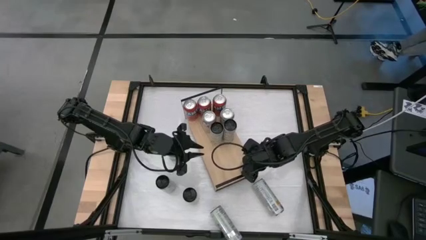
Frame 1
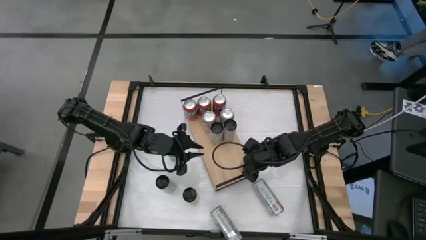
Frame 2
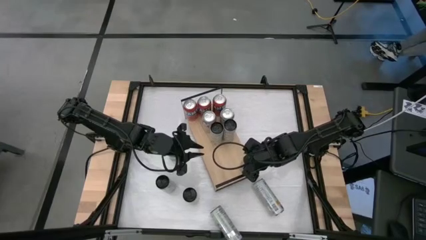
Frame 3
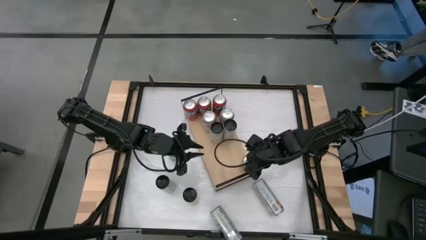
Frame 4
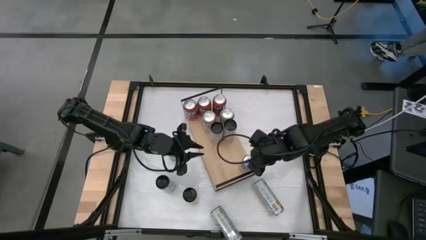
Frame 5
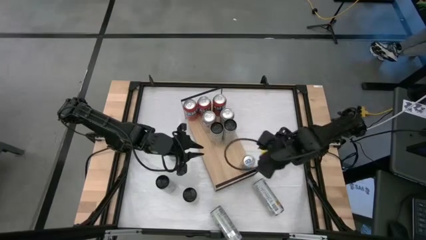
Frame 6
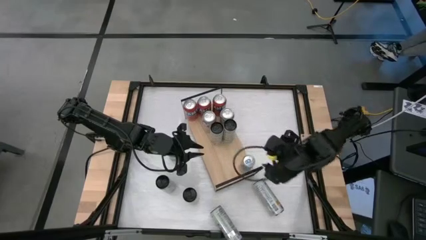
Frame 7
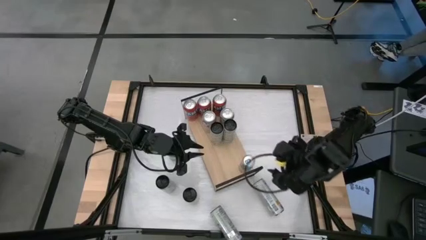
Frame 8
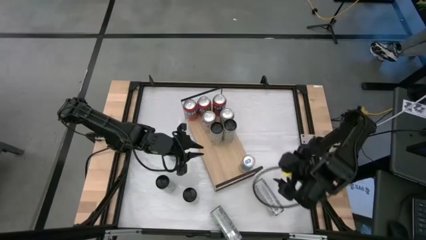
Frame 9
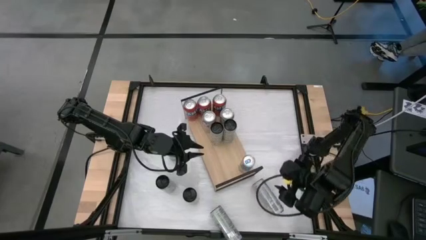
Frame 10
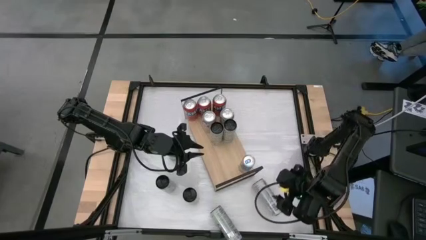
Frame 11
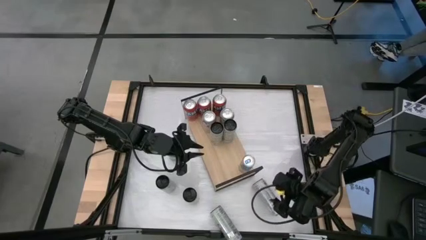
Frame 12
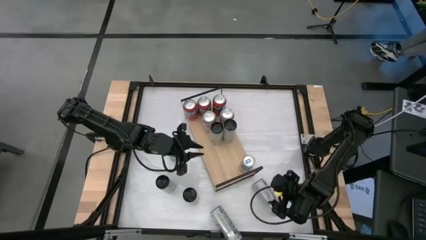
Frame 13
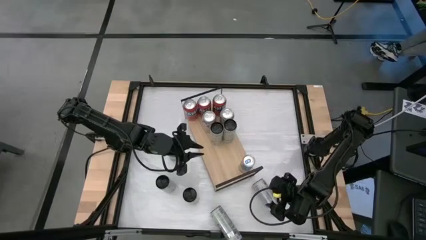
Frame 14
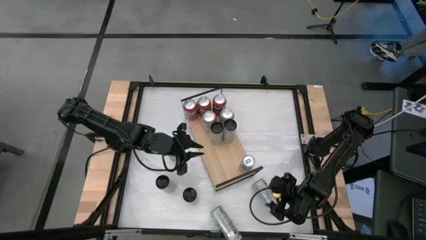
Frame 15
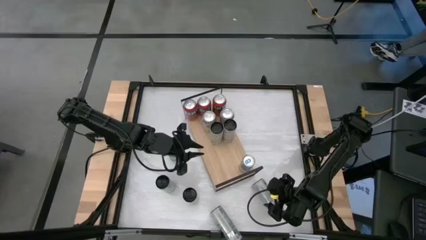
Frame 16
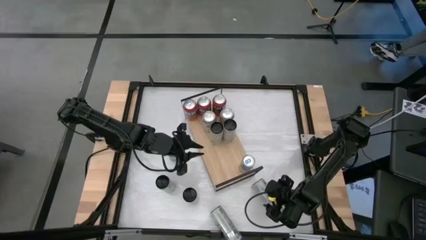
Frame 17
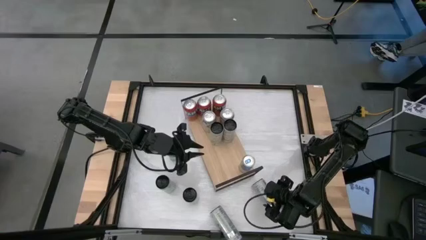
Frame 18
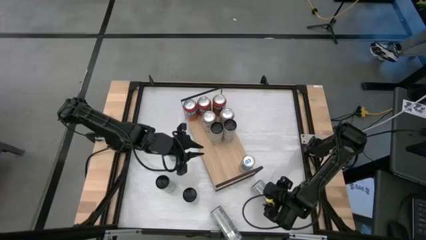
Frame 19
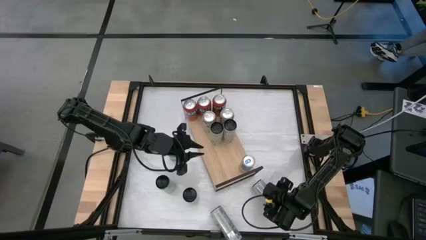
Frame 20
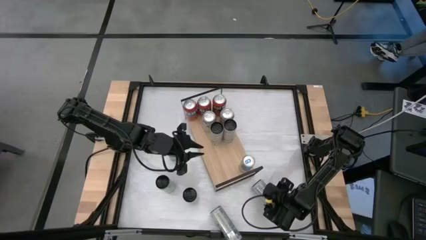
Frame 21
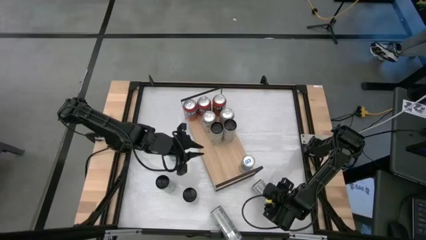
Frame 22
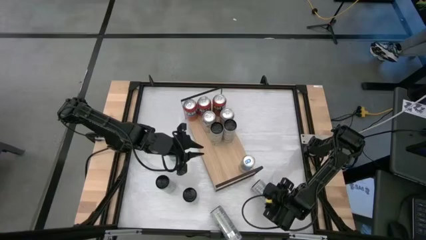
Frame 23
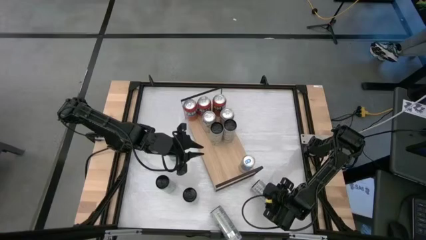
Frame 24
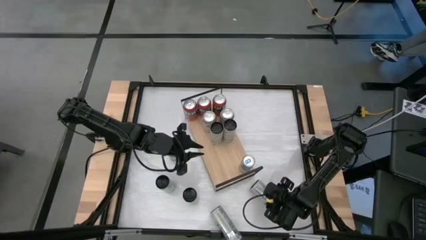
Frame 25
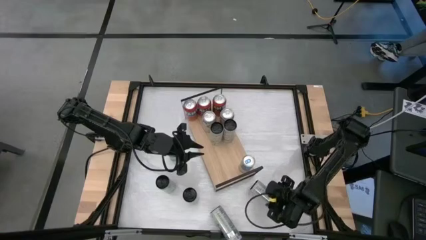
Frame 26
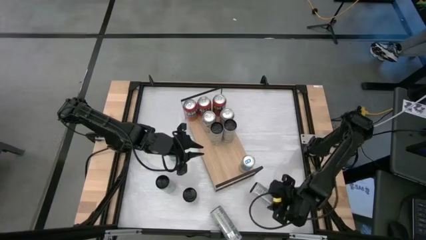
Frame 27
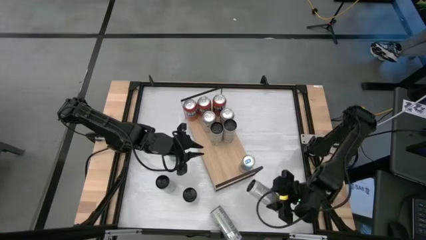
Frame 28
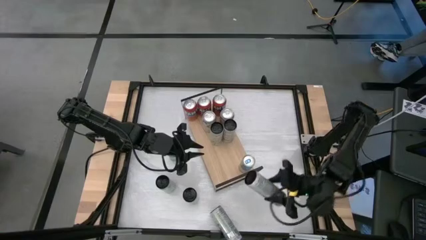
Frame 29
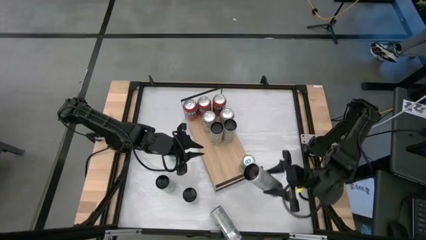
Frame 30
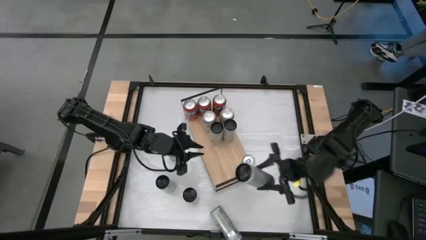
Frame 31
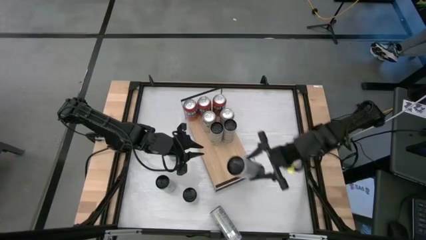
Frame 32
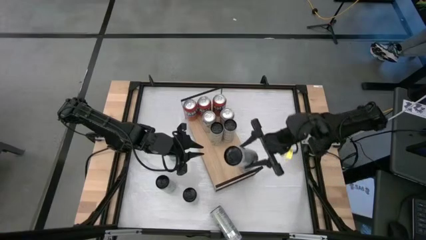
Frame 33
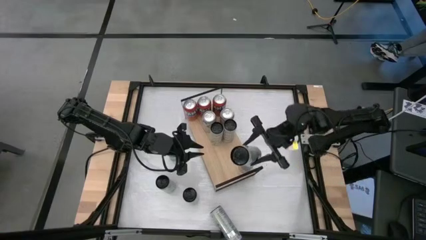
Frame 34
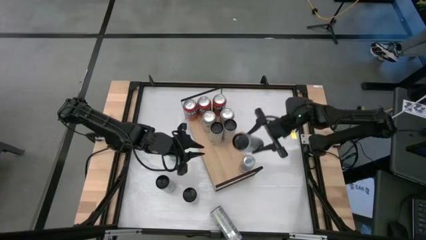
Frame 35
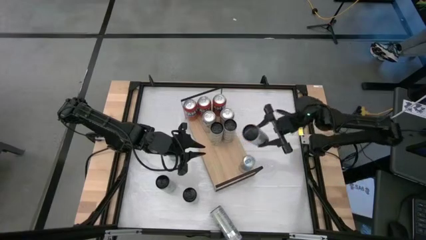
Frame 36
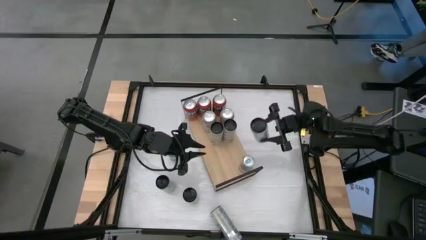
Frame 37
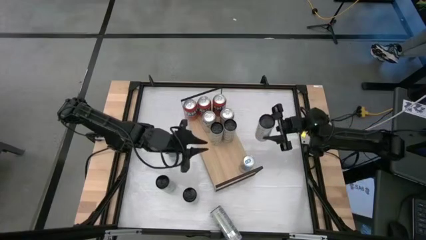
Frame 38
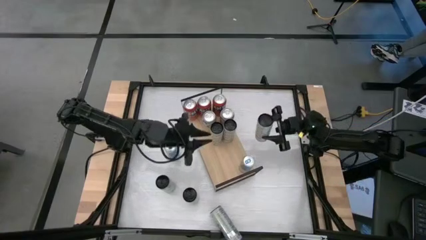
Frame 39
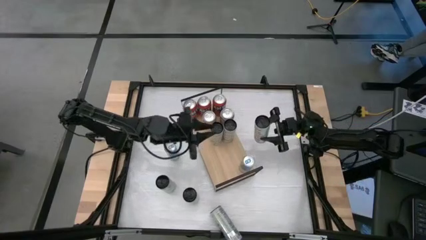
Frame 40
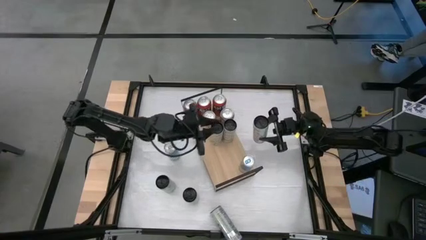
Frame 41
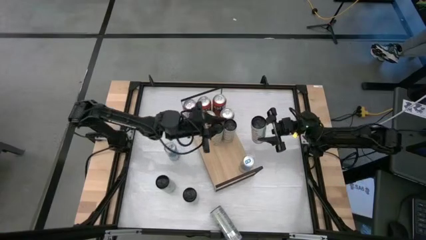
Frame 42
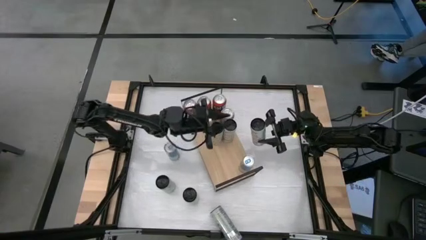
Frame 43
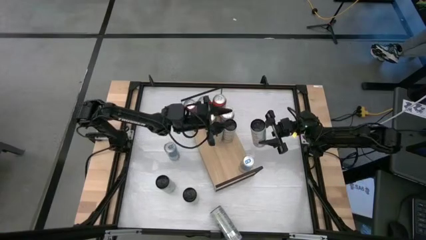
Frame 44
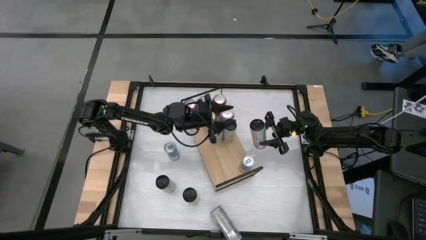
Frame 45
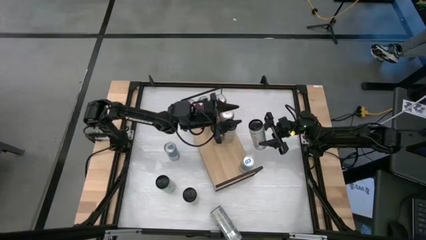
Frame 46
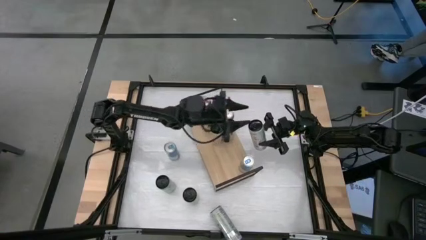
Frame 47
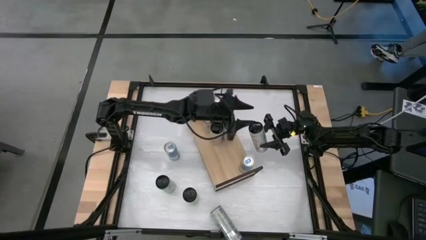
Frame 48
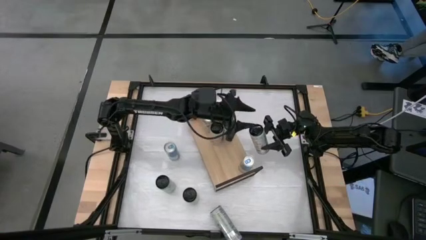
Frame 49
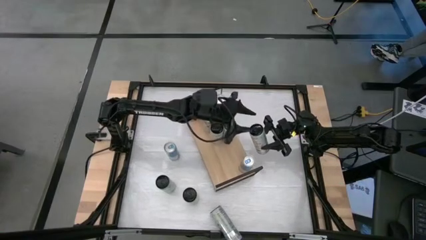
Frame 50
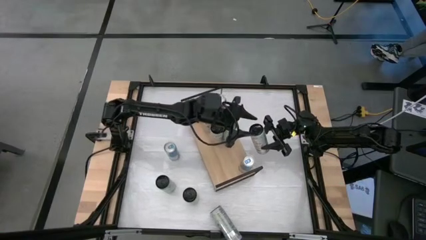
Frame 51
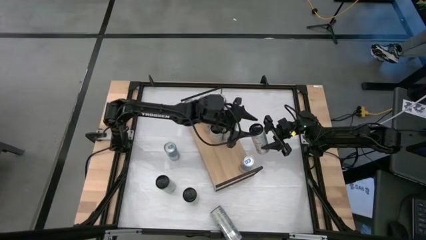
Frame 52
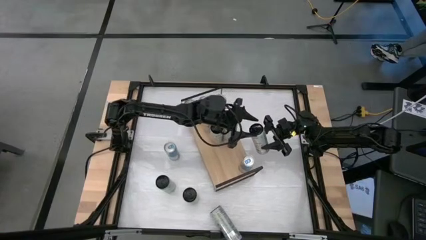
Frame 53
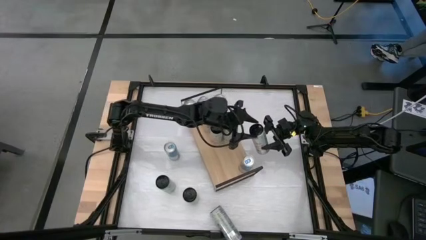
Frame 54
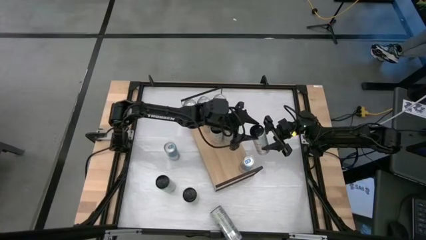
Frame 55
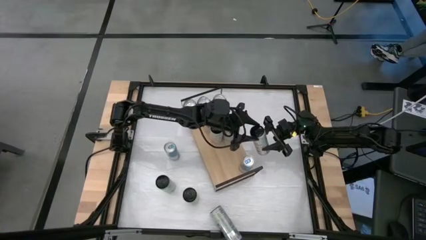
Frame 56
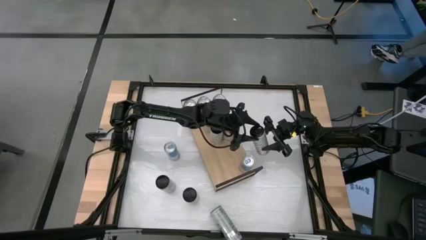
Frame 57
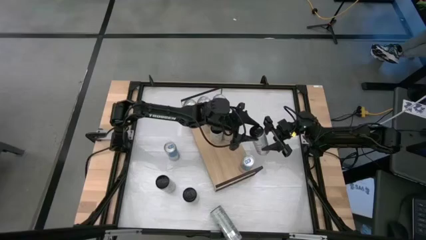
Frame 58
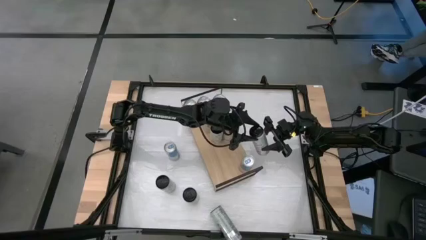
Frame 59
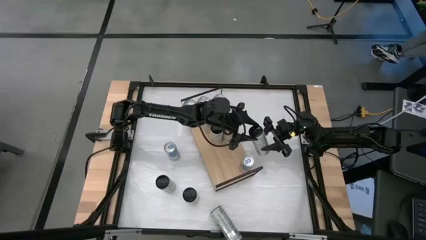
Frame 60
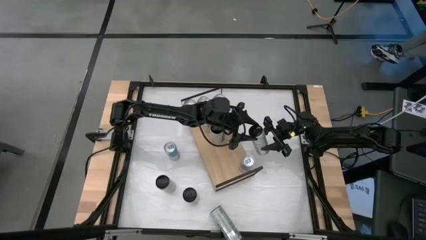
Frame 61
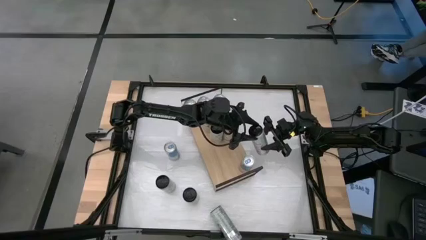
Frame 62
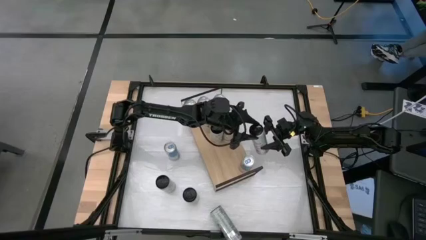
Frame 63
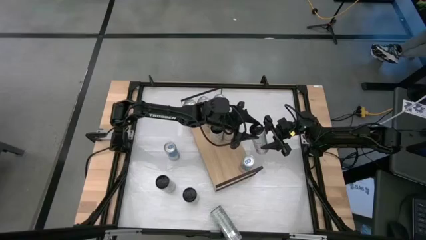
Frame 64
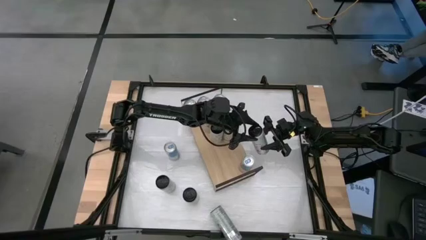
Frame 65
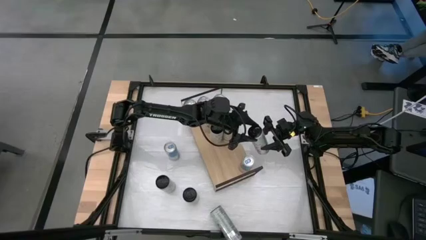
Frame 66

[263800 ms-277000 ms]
Task: Place canned beverage on shelf
Put the yellow soda can on the shelf

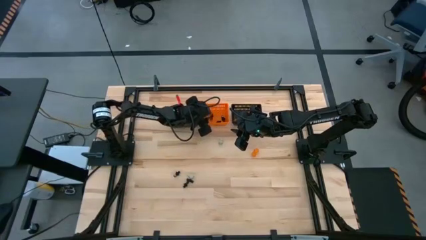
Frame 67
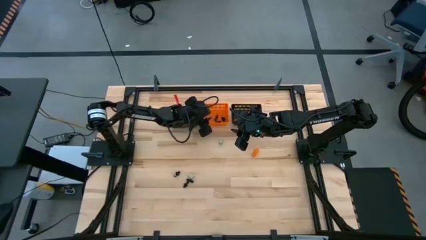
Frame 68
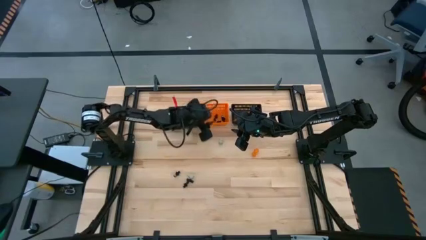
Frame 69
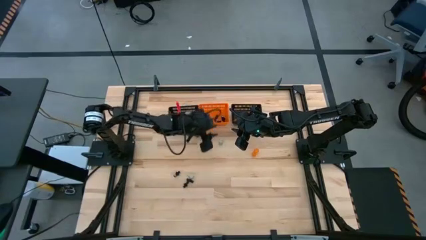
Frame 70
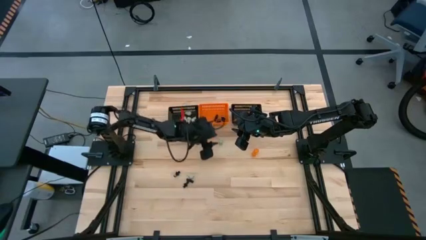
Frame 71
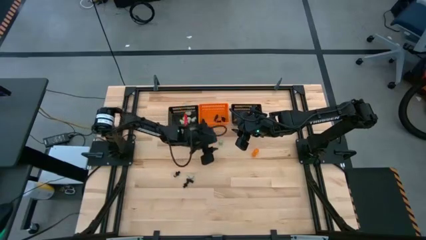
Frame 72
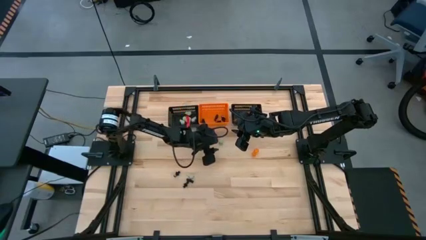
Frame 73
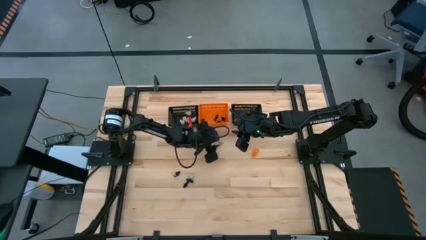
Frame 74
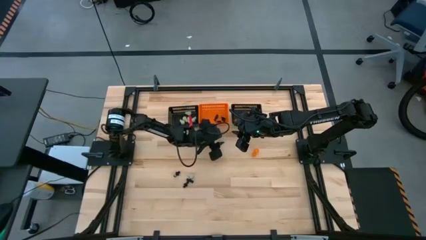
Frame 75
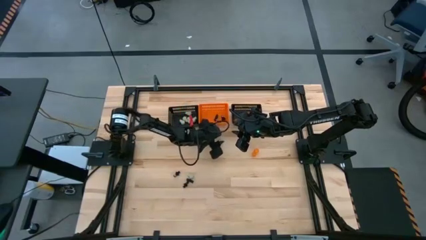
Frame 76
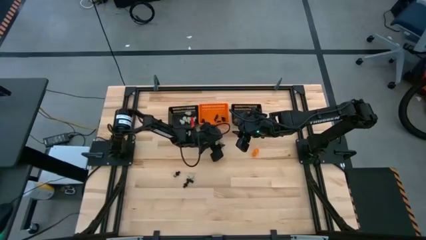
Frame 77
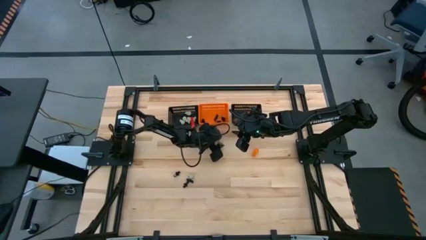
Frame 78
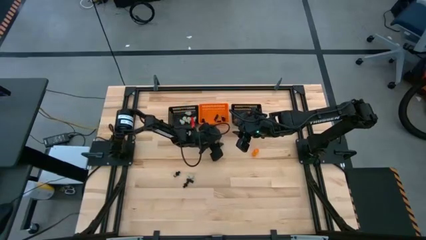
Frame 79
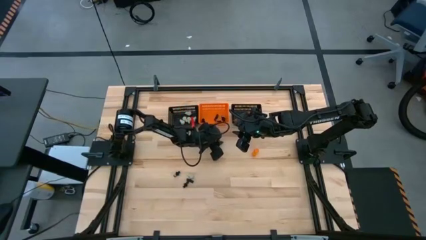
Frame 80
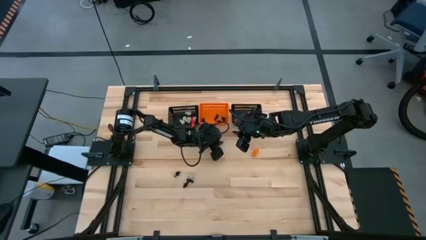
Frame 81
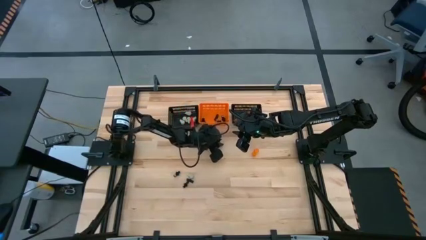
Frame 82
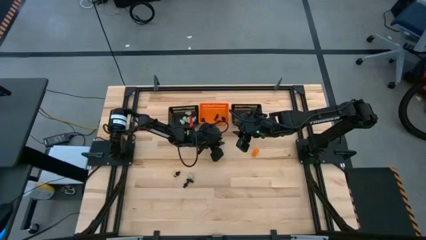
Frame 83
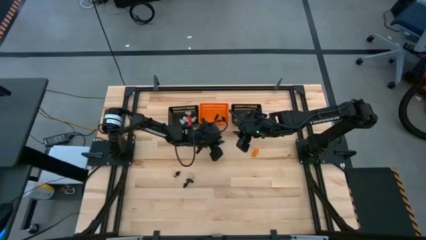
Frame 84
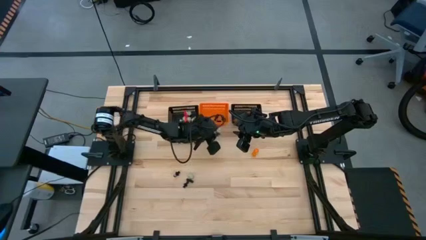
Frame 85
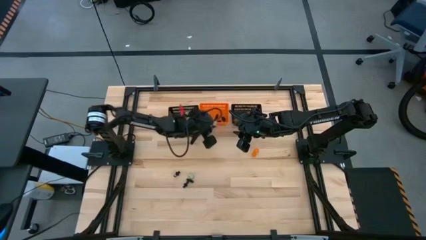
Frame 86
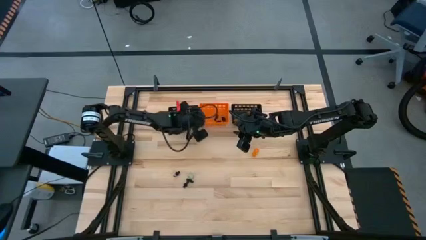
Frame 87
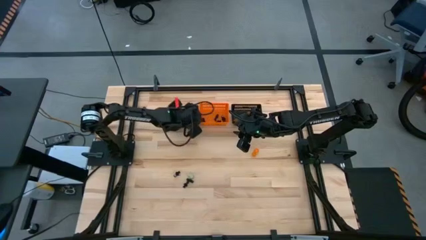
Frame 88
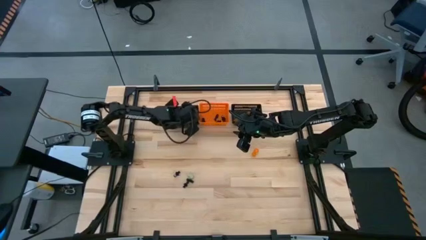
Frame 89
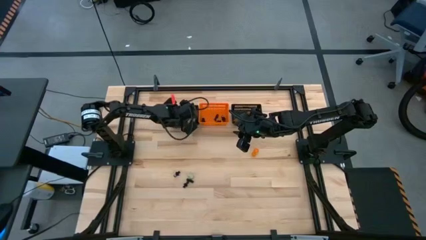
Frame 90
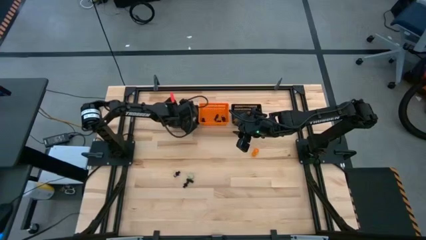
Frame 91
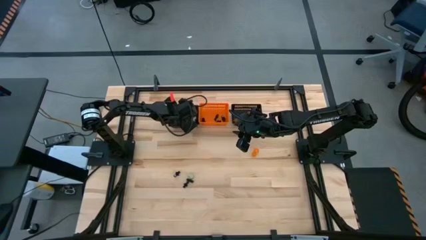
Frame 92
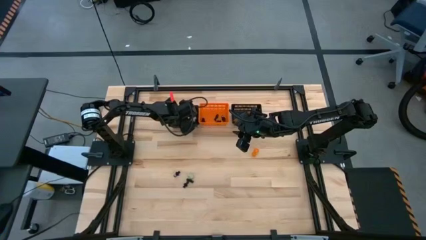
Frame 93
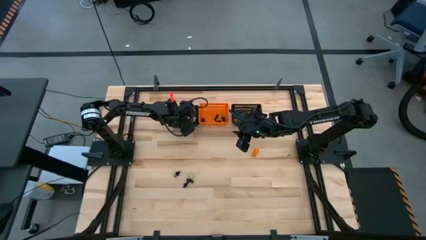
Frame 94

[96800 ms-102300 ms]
Task: Sort Halloween decoration
Put the white skull toy into the left black bin
